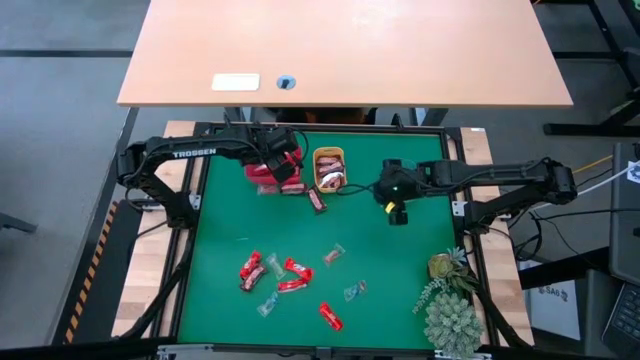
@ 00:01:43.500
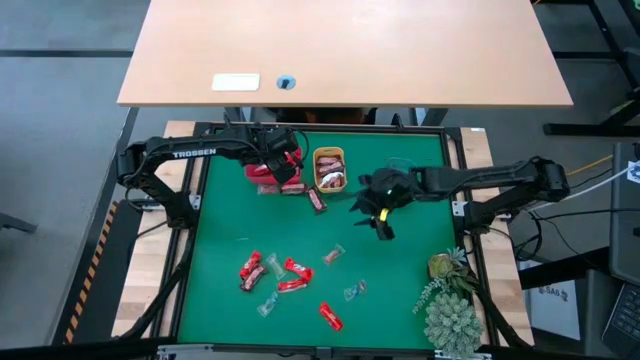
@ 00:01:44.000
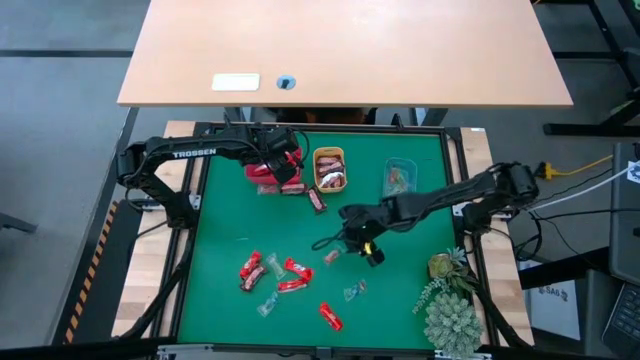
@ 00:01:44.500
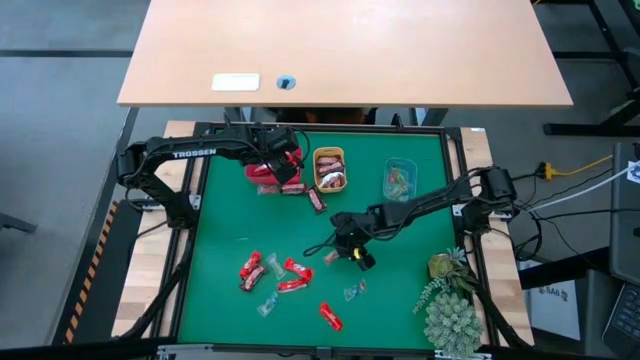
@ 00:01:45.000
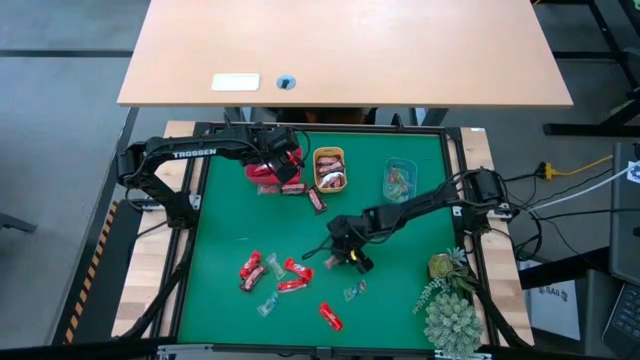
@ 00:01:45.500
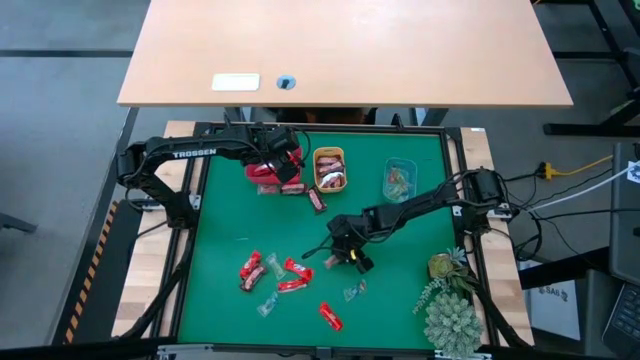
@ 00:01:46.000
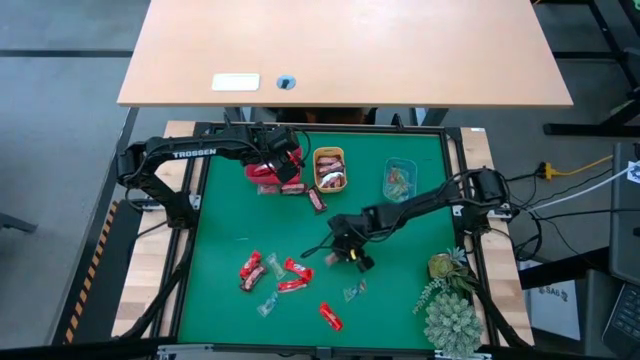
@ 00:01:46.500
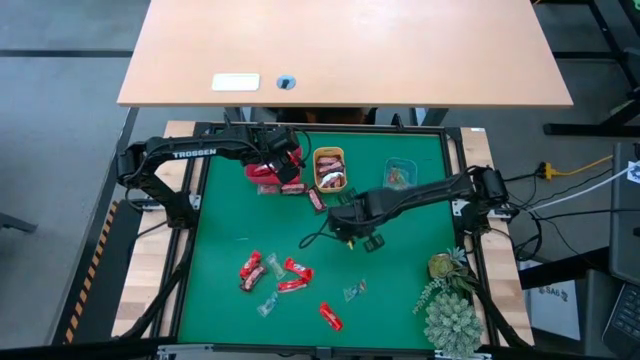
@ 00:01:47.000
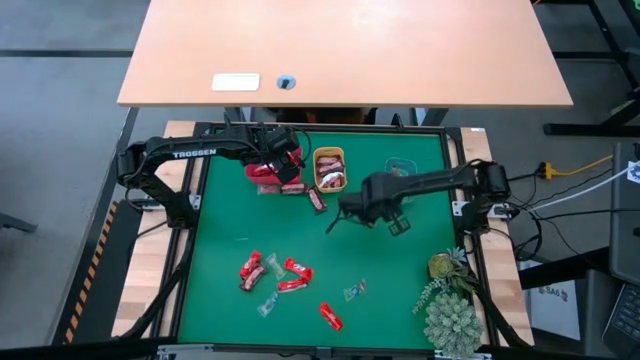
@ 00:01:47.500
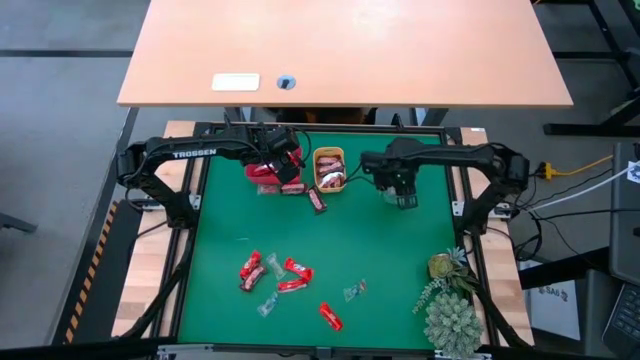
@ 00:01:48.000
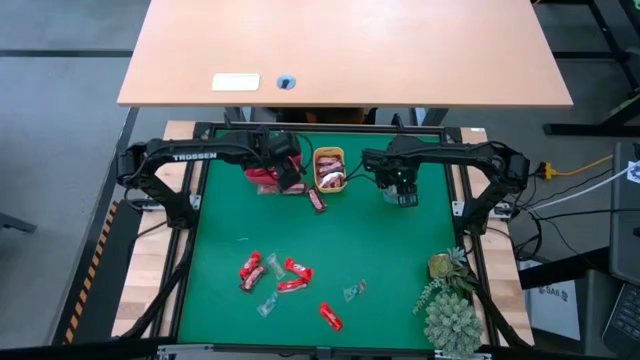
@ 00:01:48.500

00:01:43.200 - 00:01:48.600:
Task: Sort candy
Put the orange gummy into the blue bin

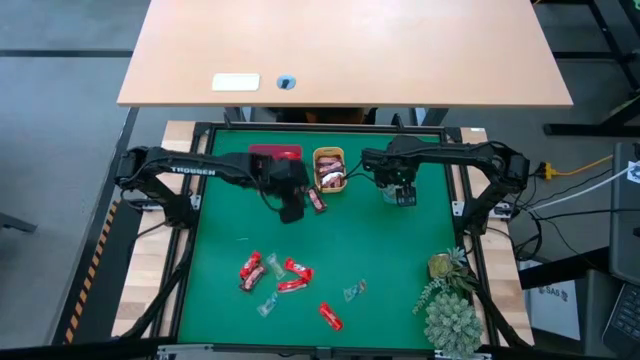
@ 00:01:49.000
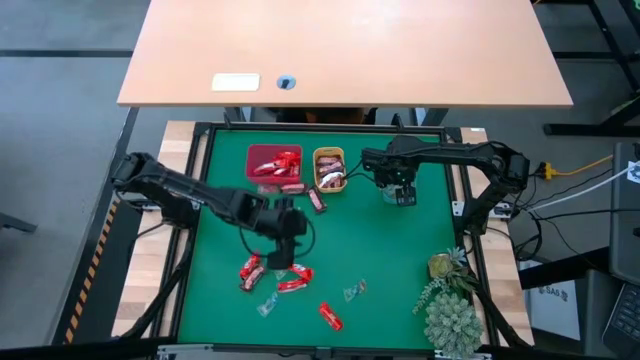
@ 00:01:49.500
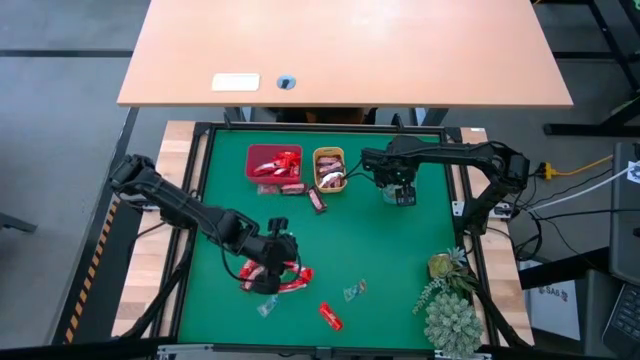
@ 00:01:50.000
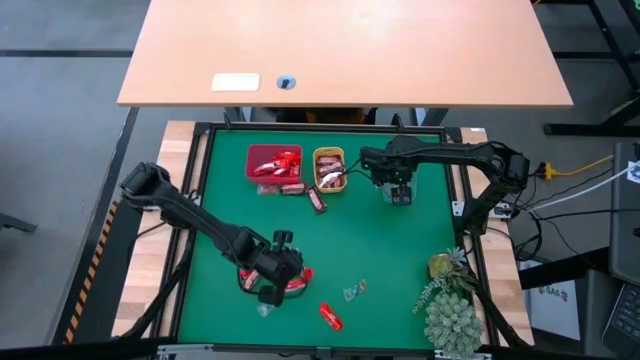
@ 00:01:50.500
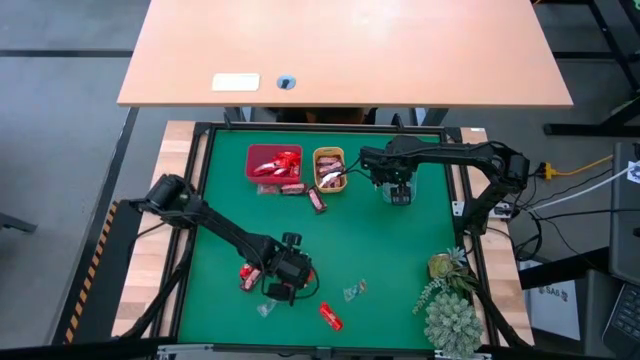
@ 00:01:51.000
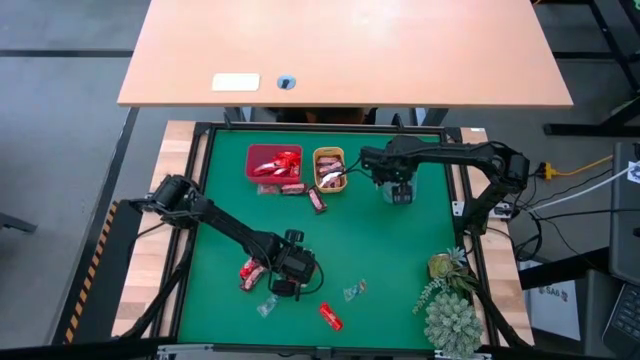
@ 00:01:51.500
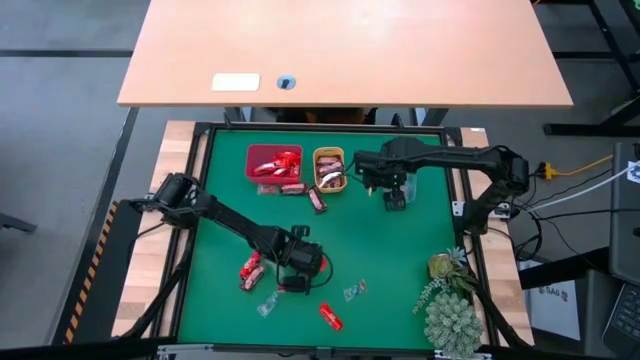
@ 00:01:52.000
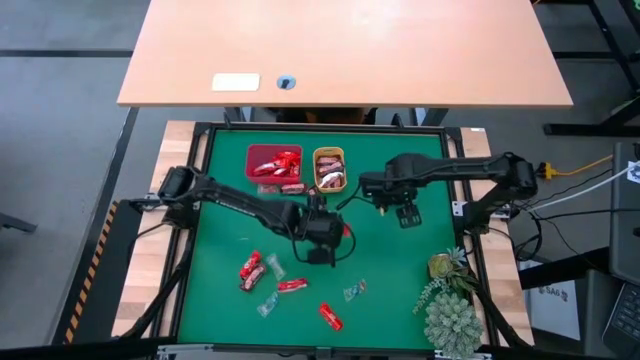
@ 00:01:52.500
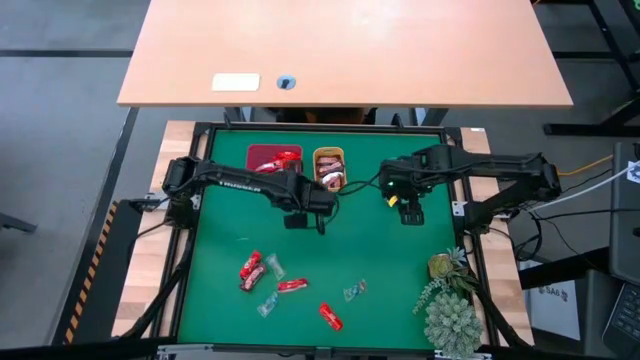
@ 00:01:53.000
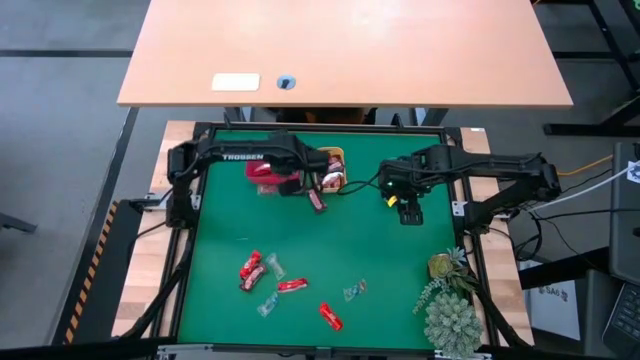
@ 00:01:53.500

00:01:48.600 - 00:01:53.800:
Put the red chocolate bar into the red bin

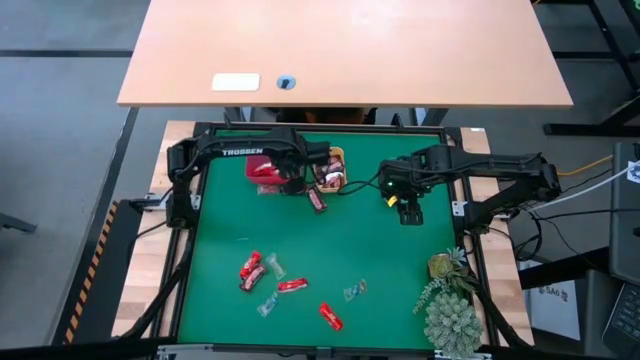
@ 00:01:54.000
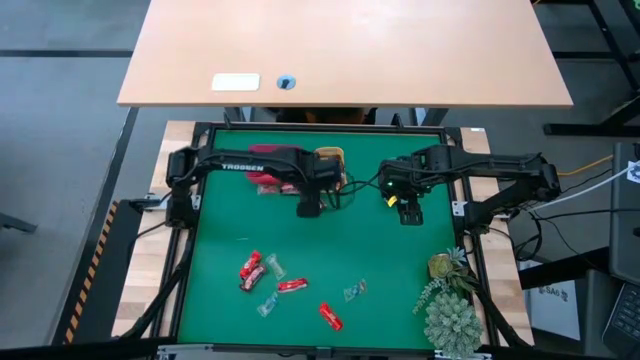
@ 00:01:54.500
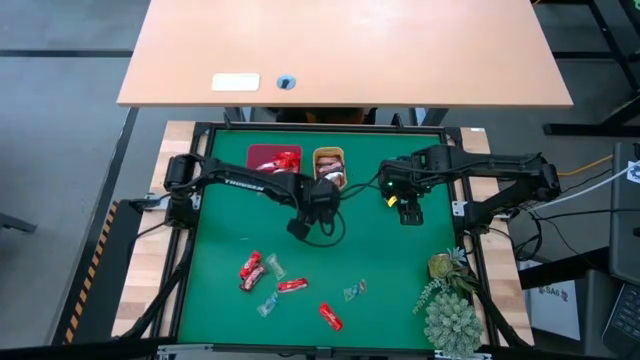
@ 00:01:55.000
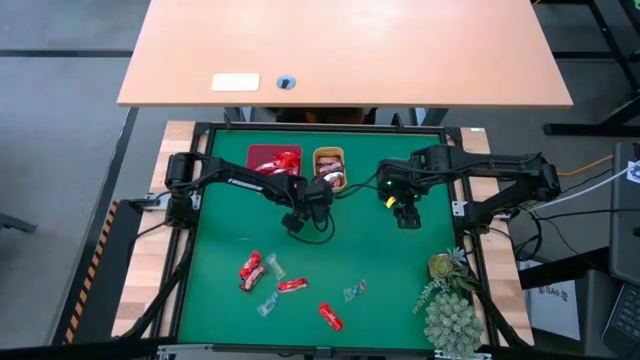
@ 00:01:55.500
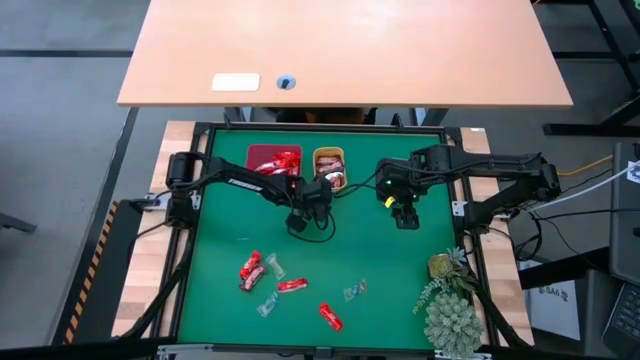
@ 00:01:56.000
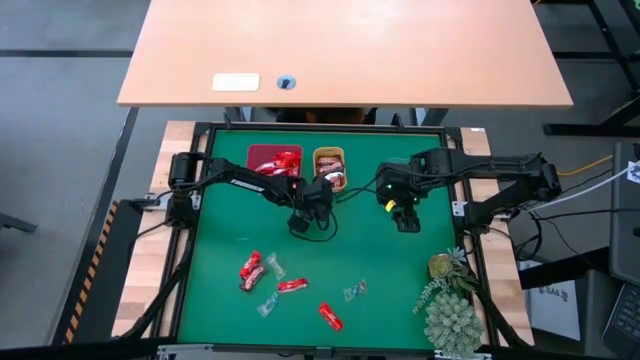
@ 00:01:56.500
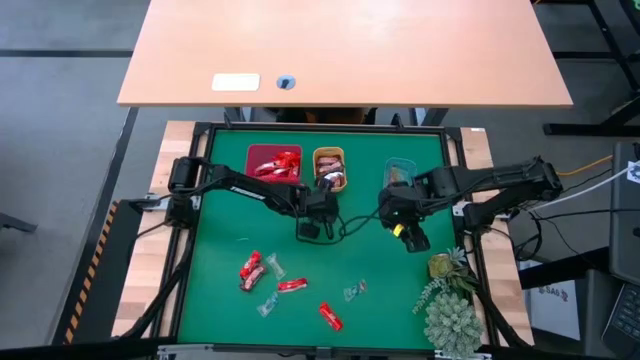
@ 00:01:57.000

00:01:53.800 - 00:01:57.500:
Put the brown chocolate bar into the yellow bin

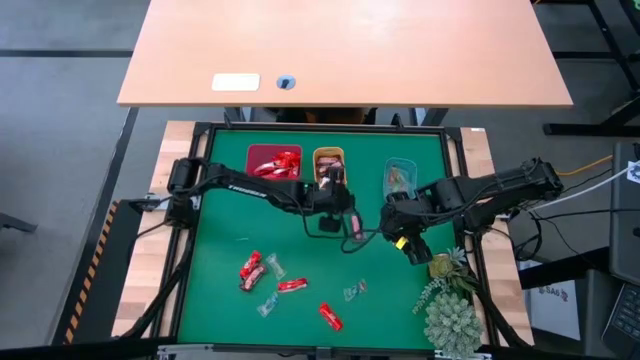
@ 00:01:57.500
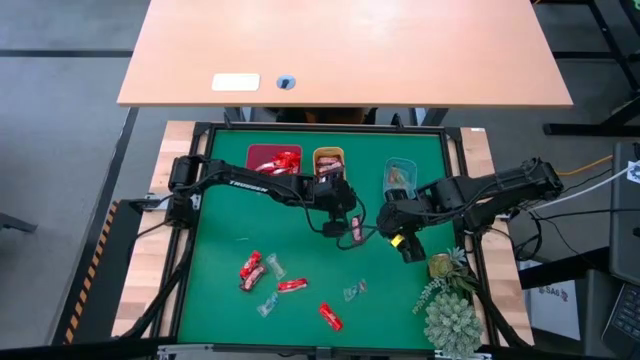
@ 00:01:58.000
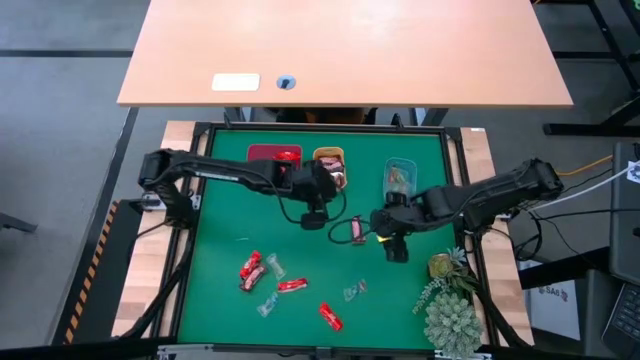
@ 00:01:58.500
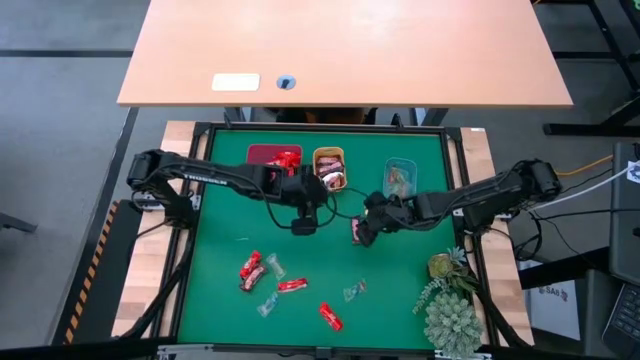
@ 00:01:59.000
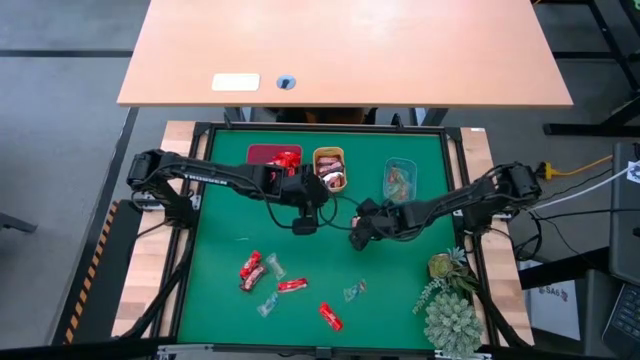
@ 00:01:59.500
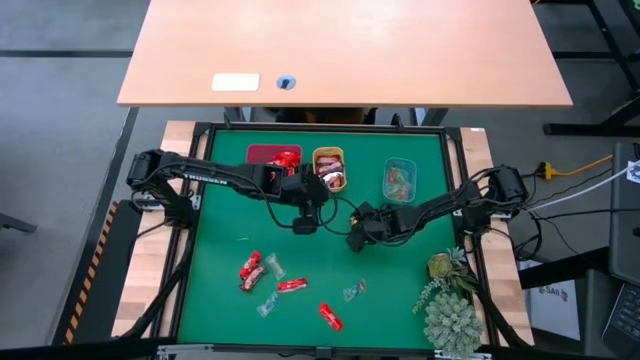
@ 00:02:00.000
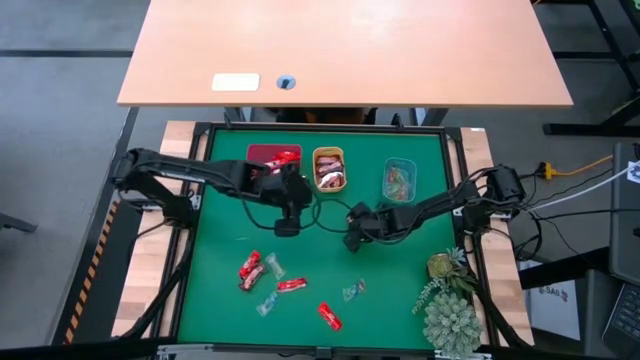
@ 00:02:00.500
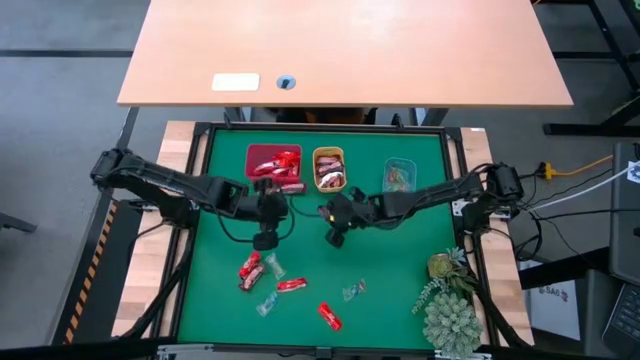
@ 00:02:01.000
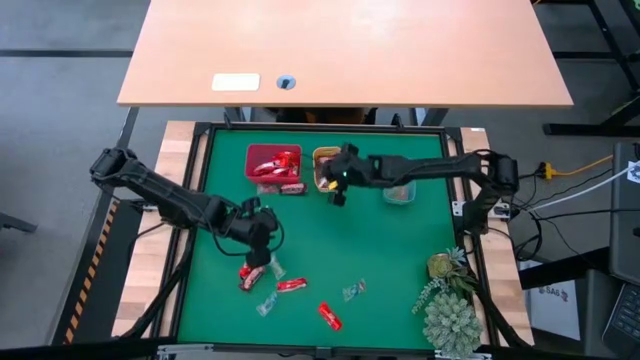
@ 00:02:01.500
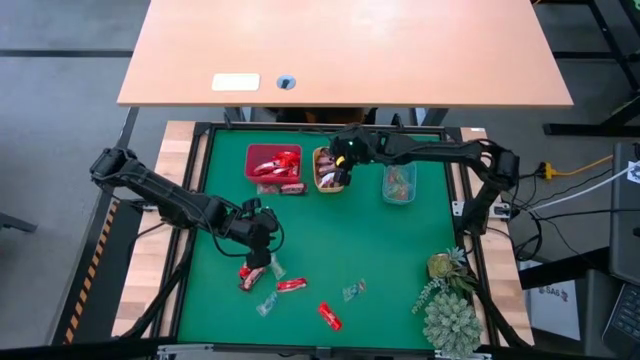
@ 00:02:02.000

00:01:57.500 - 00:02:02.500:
Put the brown chocolate bar into the yellow bin

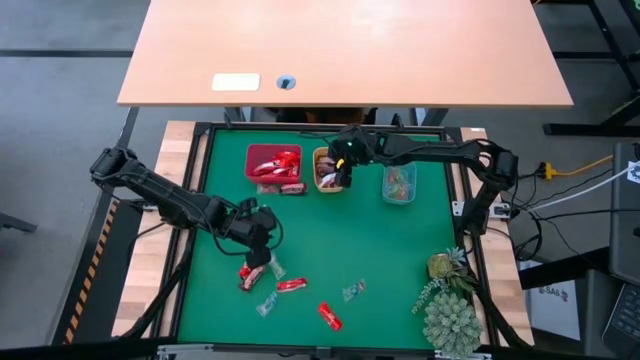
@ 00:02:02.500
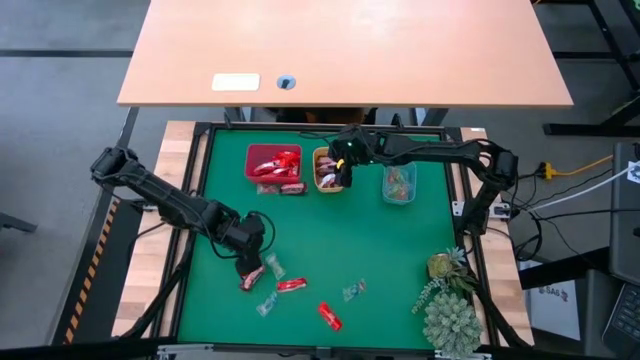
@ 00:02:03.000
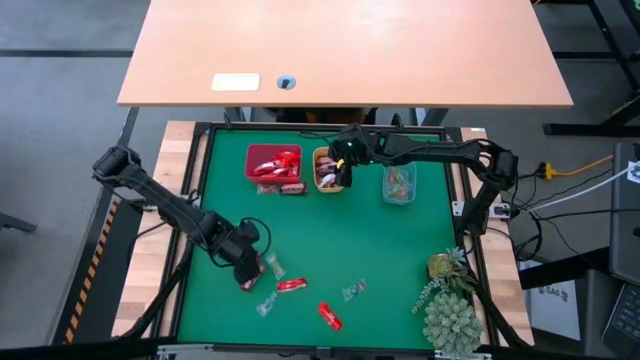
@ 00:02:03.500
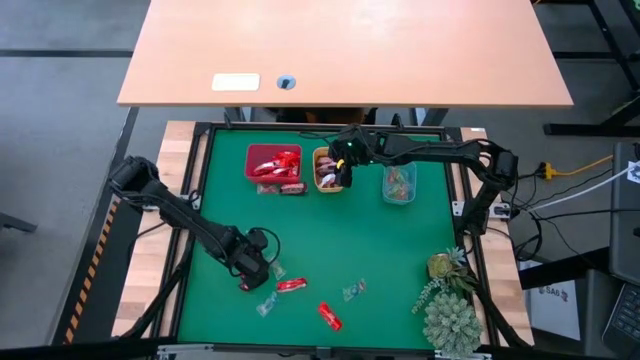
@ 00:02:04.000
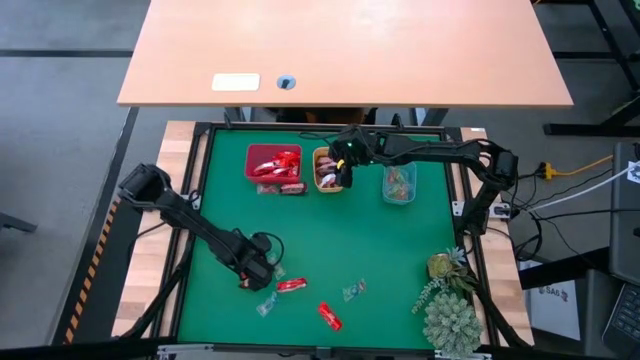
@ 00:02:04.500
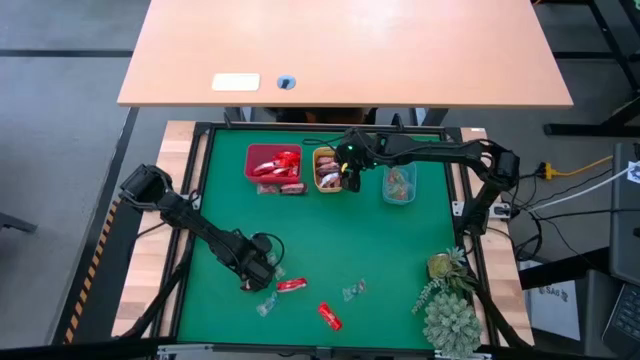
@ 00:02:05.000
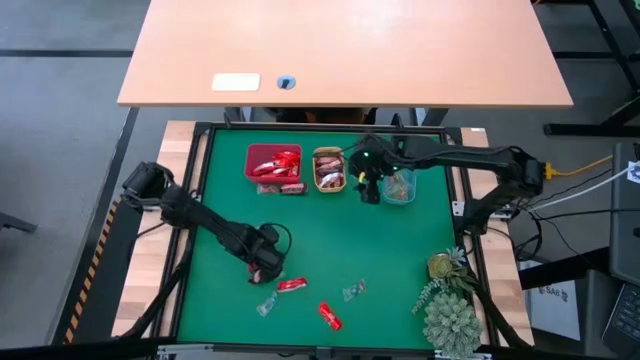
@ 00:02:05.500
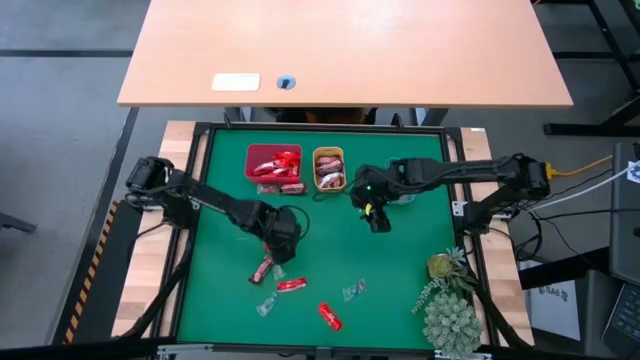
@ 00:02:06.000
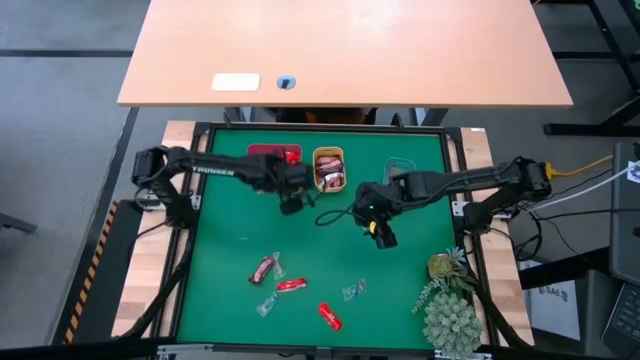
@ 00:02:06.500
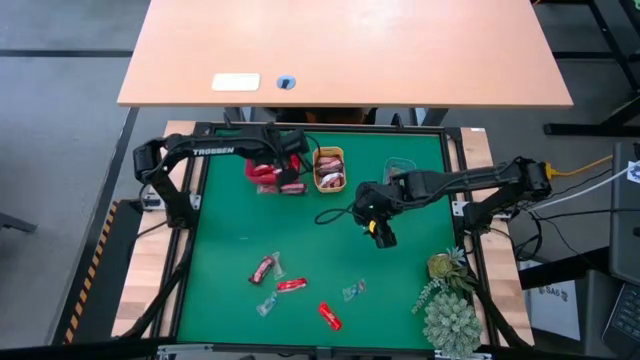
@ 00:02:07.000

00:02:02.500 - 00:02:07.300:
Put the red chocolate bar into the red bin
